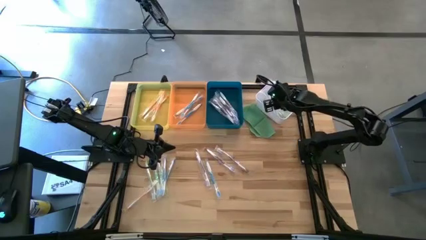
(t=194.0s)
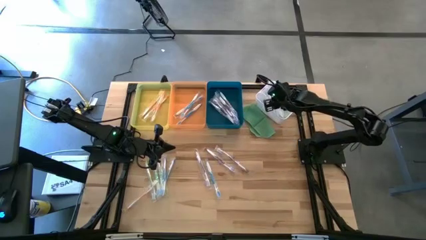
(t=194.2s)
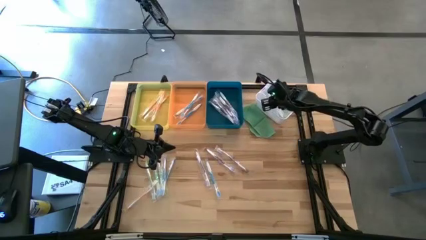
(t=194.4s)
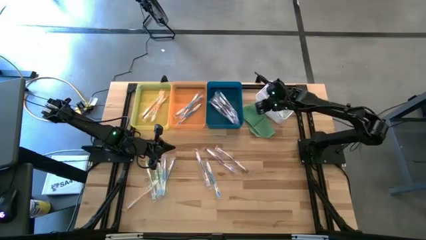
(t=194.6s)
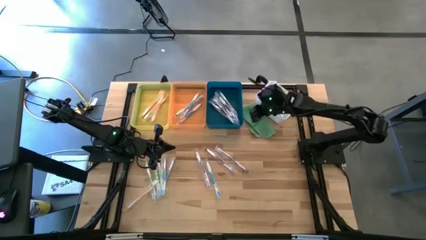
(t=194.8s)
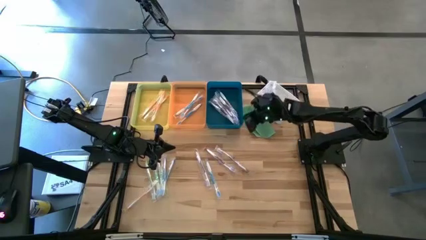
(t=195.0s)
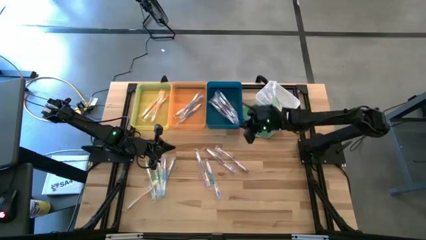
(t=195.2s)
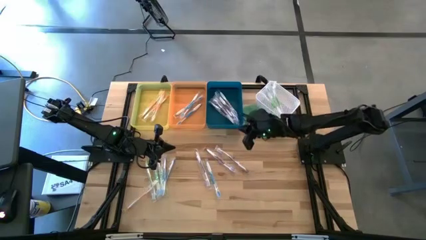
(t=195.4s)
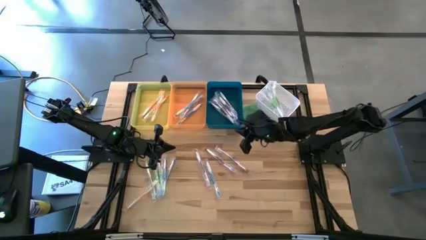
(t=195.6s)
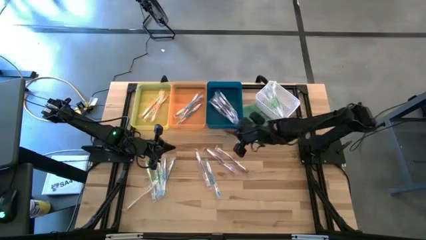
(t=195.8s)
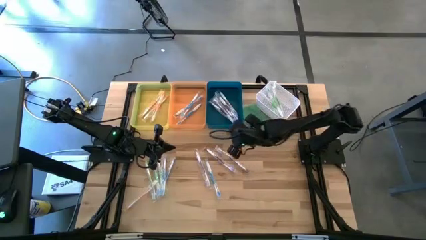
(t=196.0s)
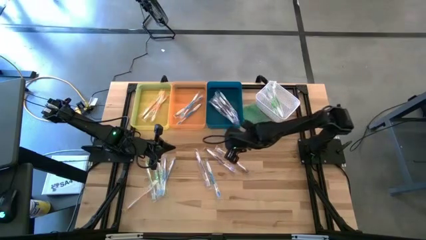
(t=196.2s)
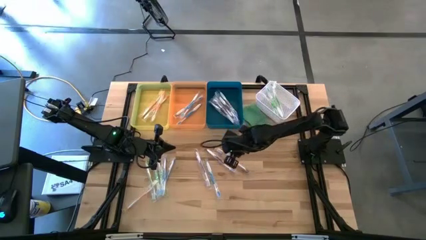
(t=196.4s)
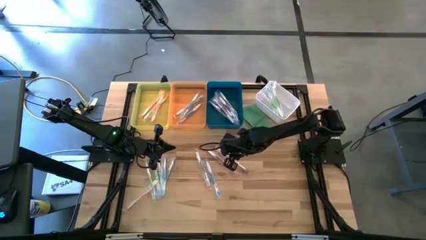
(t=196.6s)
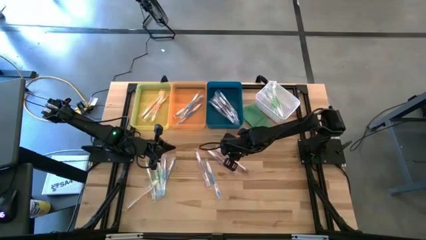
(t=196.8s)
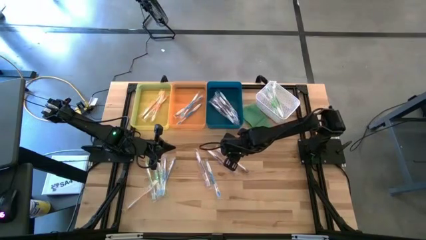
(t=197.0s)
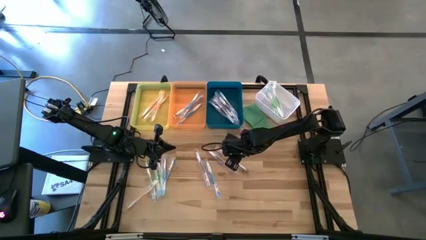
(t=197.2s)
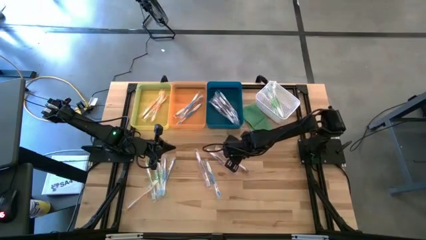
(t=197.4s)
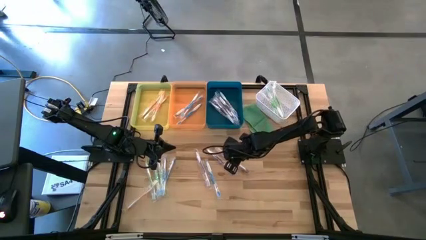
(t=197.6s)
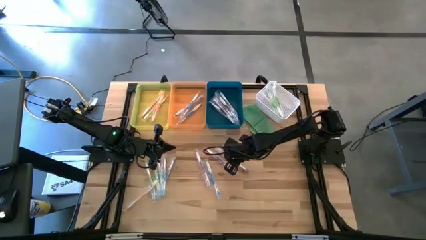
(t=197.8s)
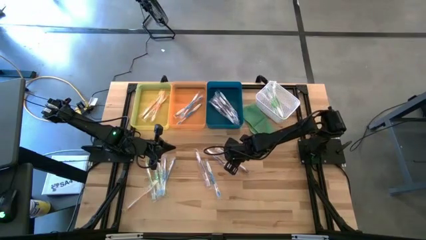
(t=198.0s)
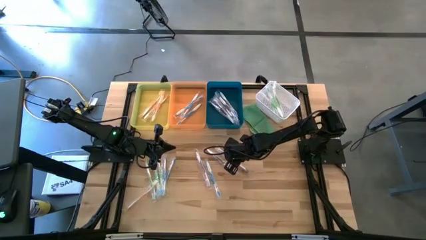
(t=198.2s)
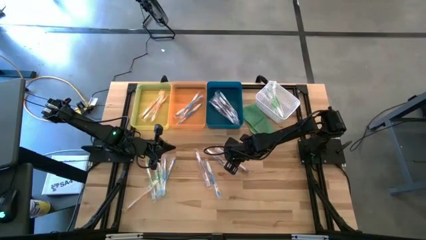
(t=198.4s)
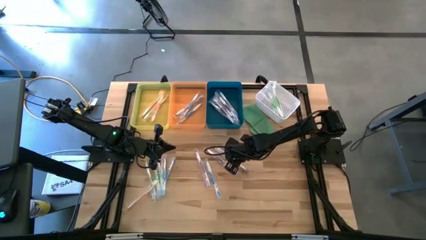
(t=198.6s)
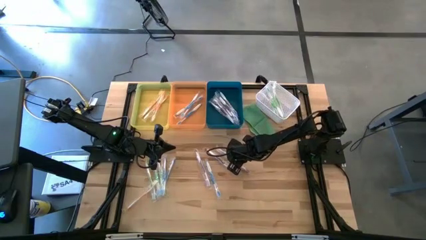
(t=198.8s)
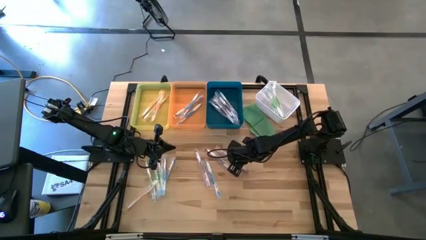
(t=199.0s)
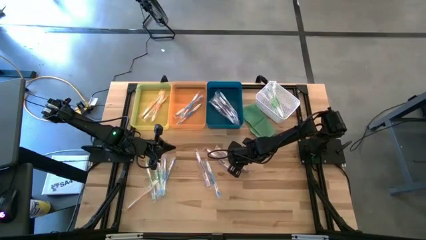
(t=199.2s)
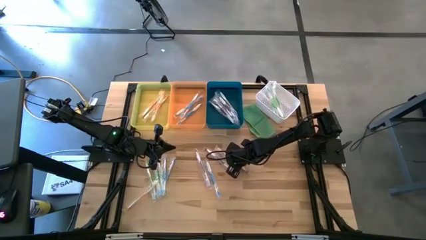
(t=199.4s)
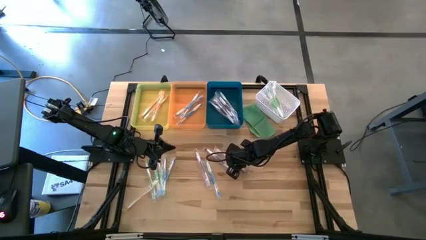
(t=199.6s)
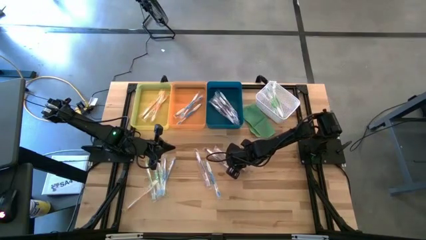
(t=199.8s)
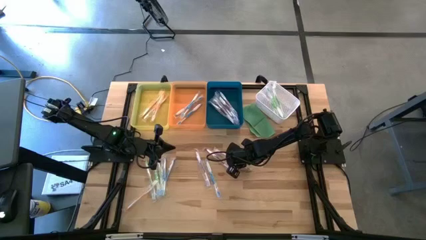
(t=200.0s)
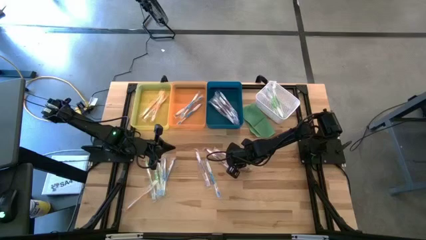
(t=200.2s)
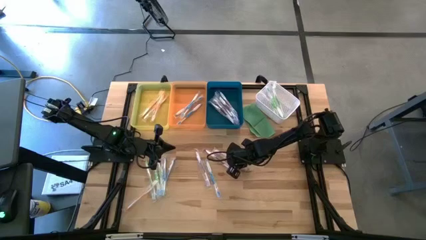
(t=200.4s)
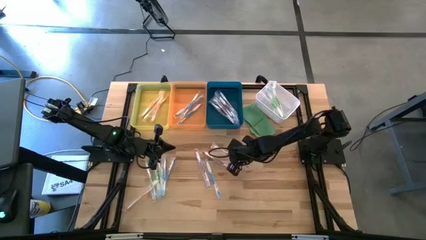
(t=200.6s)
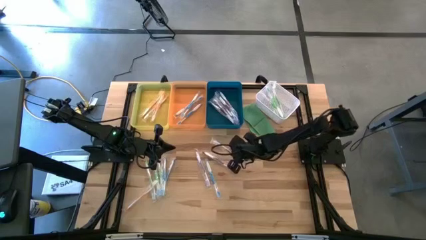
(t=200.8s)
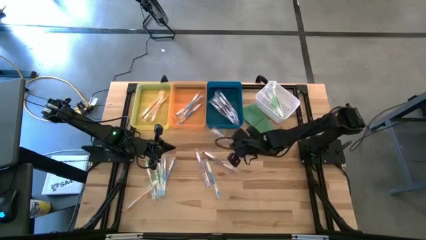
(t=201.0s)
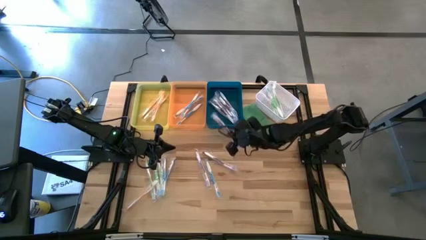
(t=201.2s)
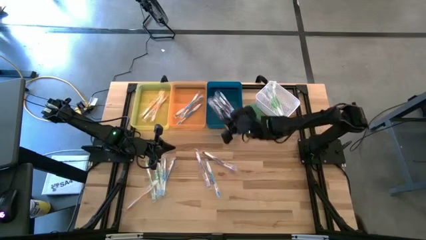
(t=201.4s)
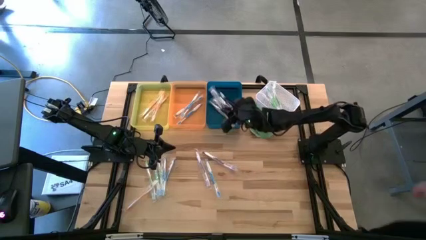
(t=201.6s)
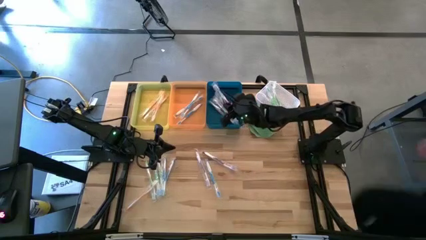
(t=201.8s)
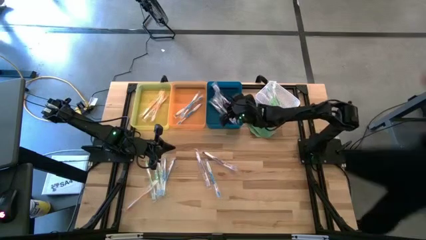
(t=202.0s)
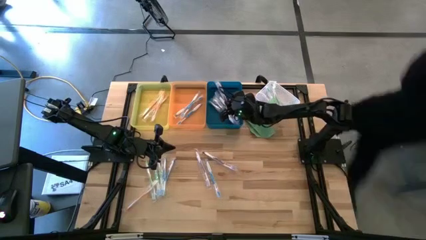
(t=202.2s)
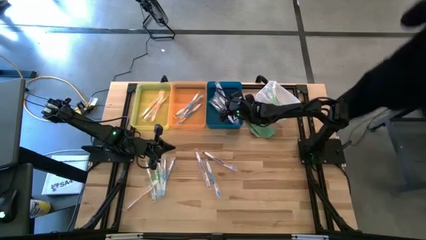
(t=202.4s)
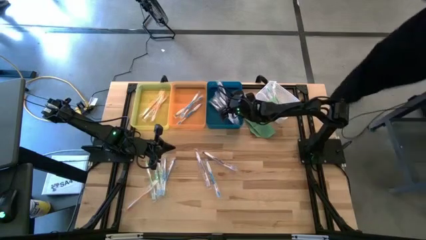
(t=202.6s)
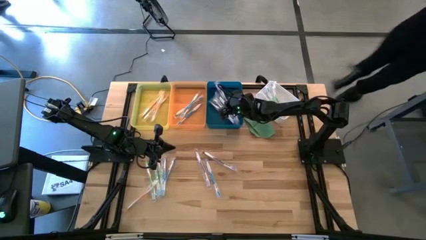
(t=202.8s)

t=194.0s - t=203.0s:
Task: Pick & Place Toothbrushes
Put the purple toothbrush into the blue bin

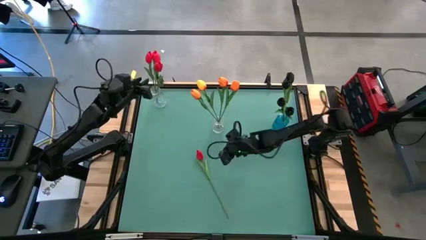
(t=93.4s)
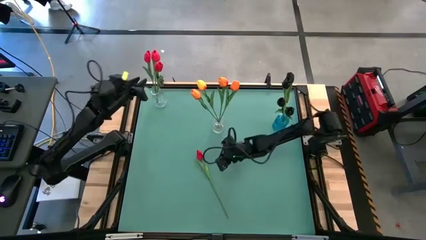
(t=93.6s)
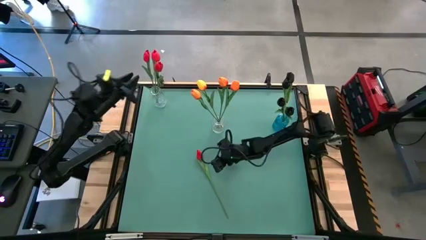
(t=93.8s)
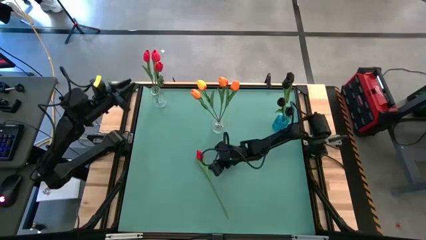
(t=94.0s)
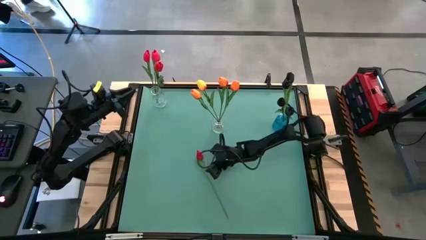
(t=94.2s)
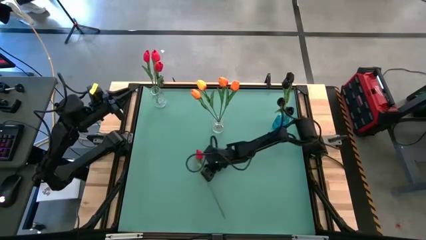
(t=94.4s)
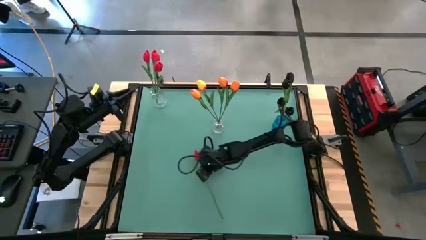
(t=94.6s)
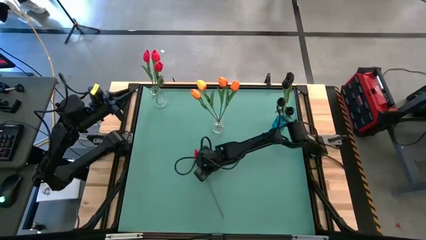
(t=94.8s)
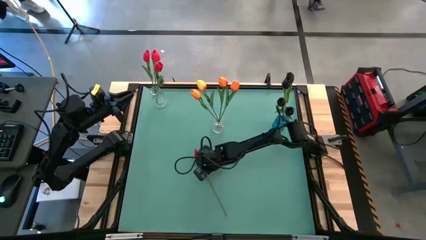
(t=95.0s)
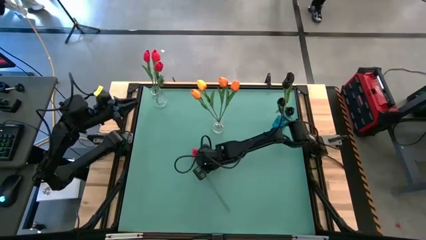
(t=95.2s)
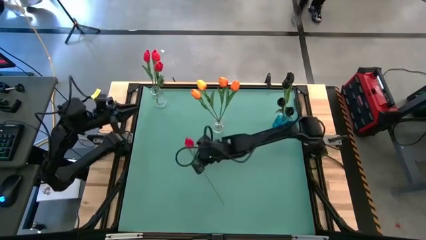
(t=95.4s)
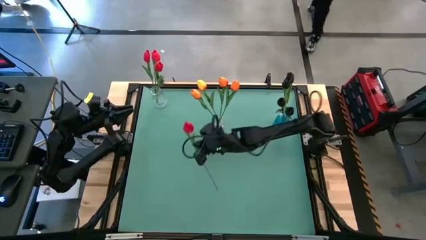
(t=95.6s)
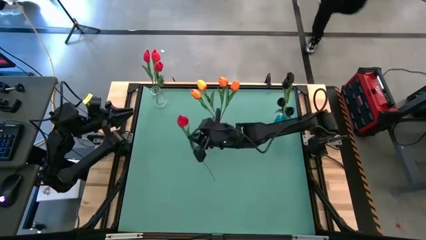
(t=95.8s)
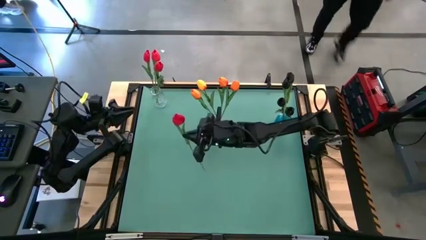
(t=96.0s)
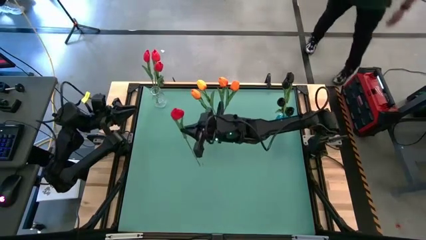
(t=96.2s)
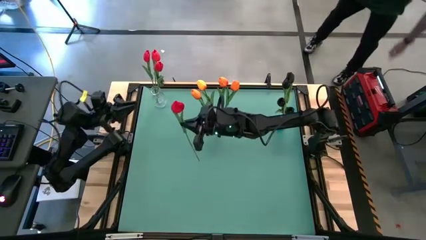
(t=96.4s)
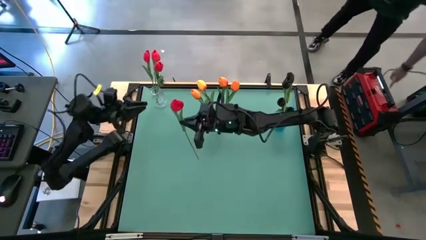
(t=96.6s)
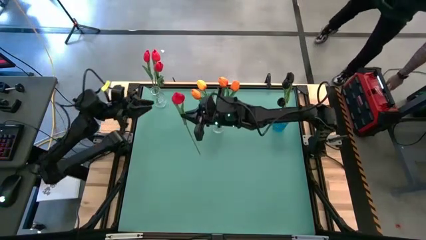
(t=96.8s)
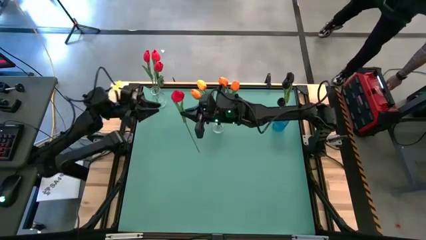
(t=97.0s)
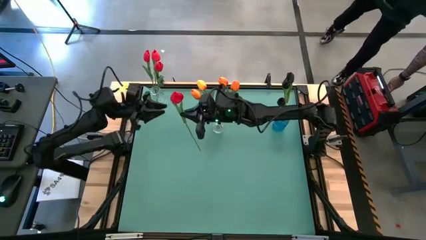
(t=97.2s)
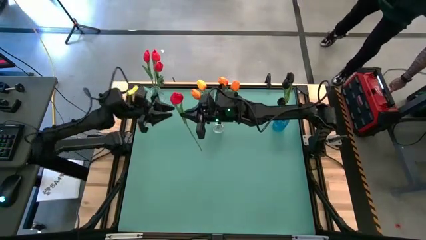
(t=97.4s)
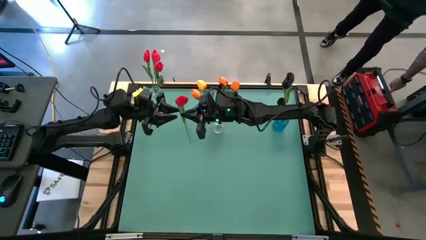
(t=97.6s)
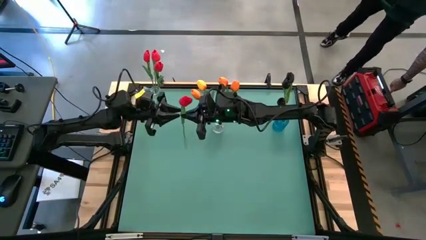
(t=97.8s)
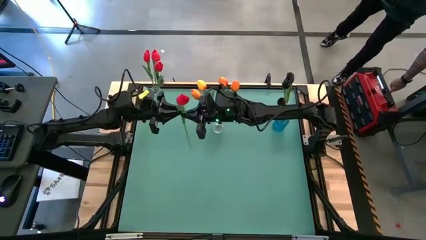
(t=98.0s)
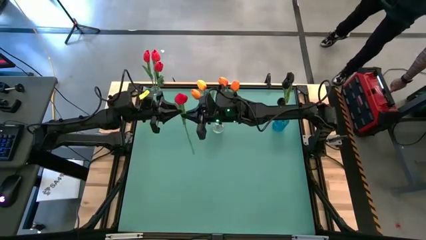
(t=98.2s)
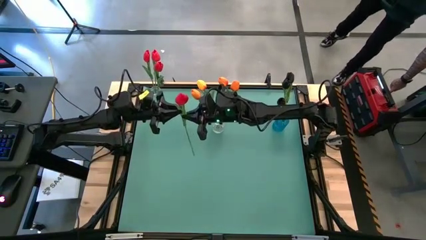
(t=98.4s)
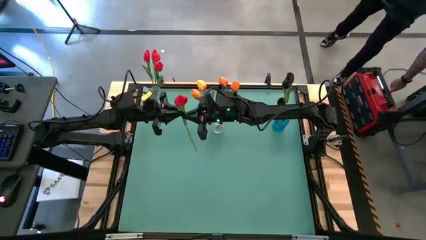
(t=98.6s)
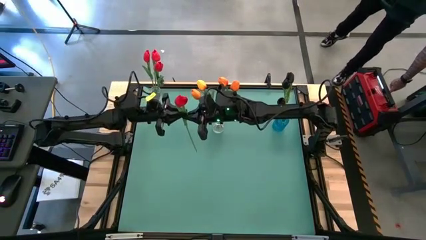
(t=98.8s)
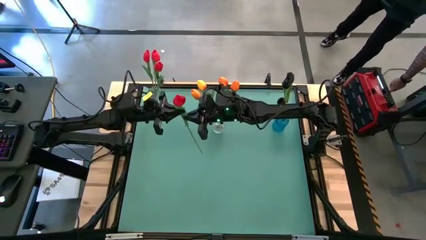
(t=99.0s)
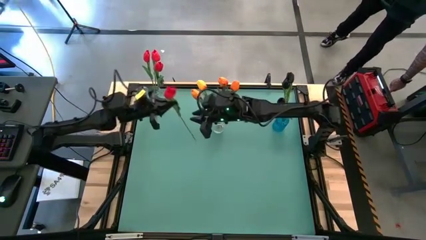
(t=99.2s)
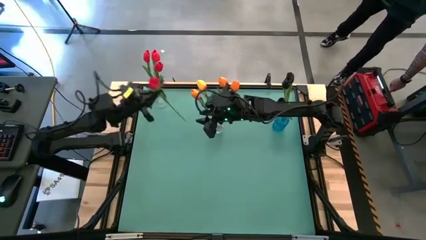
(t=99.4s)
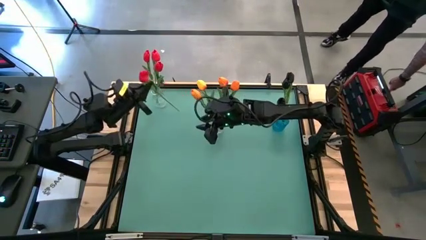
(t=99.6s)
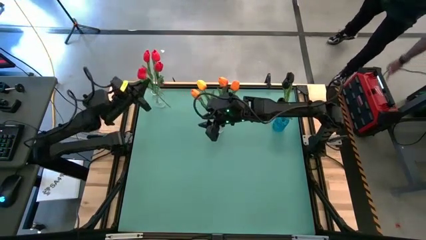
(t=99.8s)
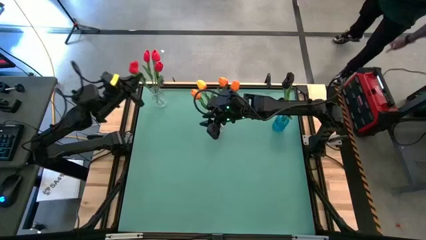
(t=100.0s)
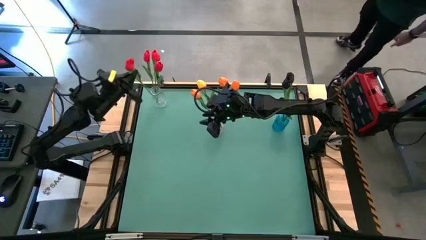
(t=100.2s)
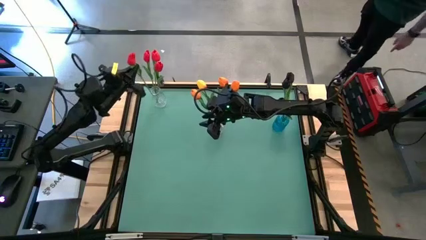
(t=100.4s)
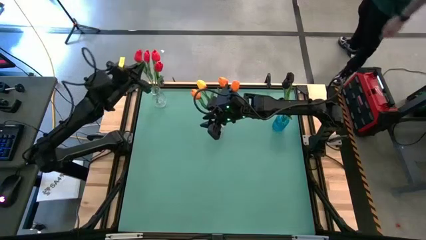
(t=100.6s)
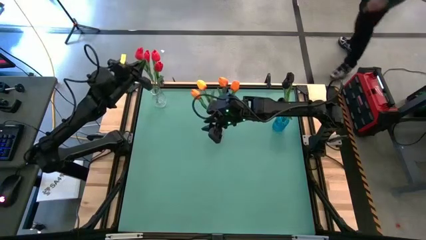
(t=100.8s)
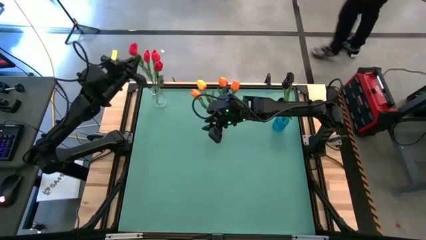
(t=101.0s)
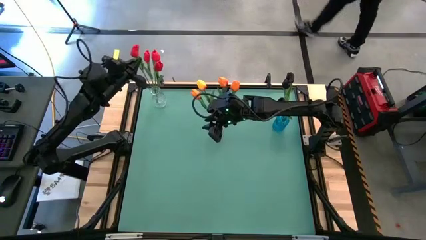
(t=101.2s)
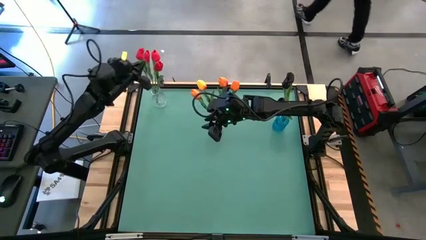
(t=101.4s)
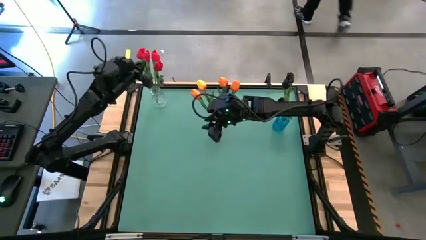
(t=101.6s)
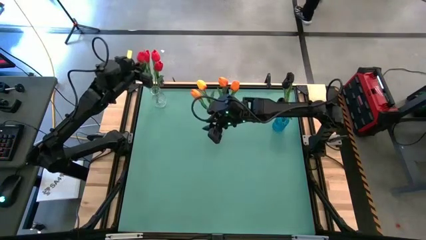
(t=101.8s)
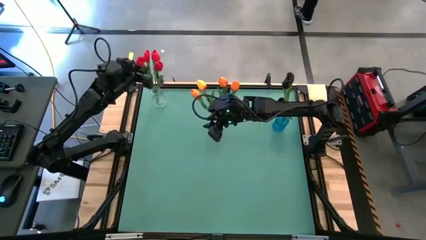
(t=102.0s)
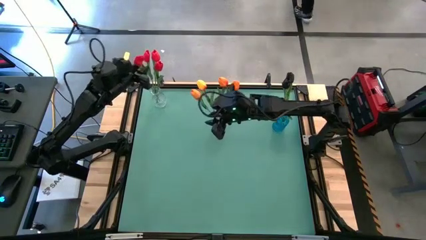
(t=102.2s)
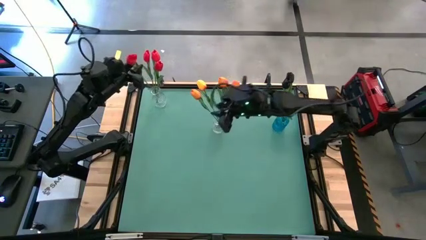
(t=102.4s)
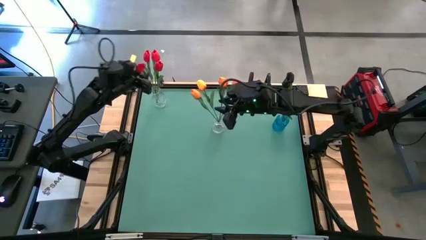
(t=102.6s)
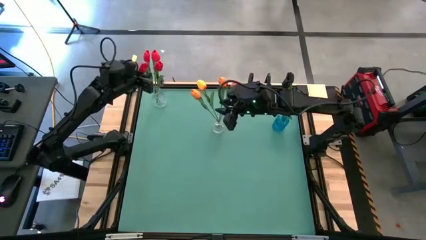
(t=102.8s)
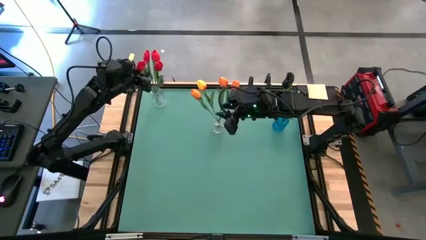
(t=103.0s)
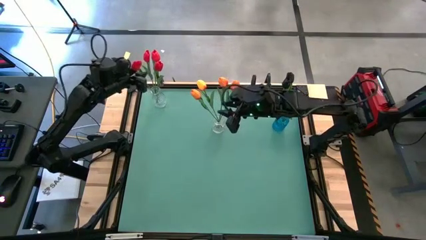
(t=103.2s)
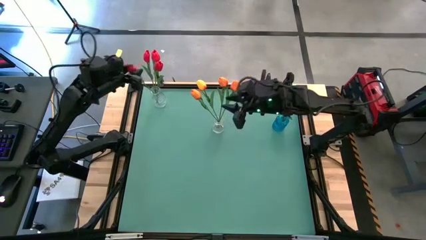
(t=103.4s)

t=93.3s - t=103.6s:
Task: Sort flowers into vase by color
Put the pink tulip into the top left transparent vase
